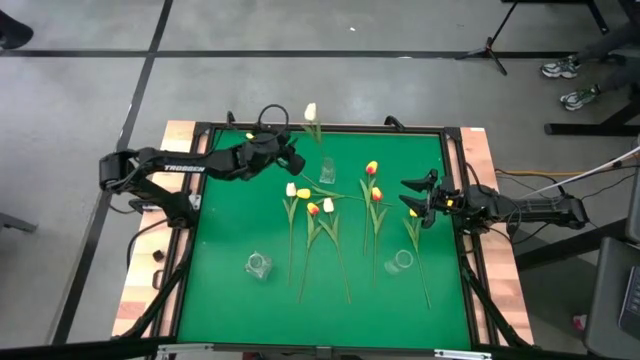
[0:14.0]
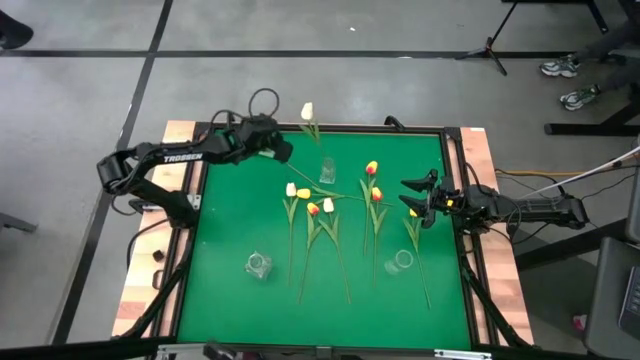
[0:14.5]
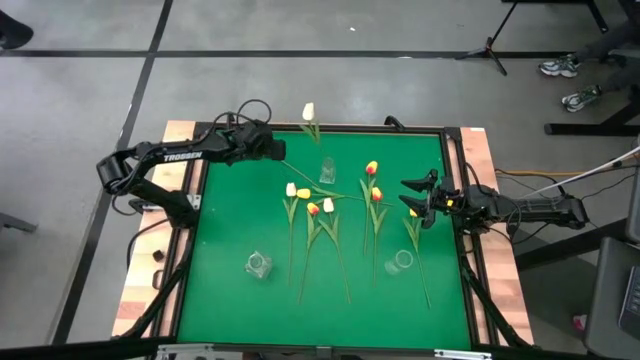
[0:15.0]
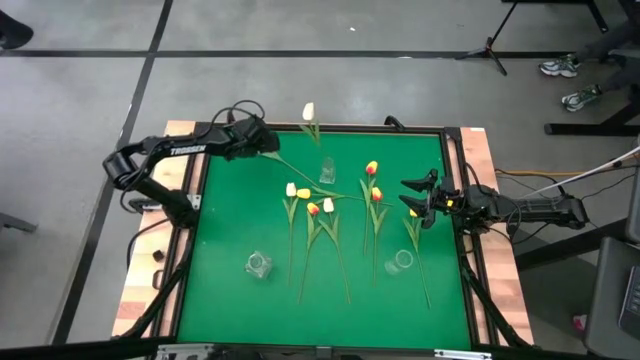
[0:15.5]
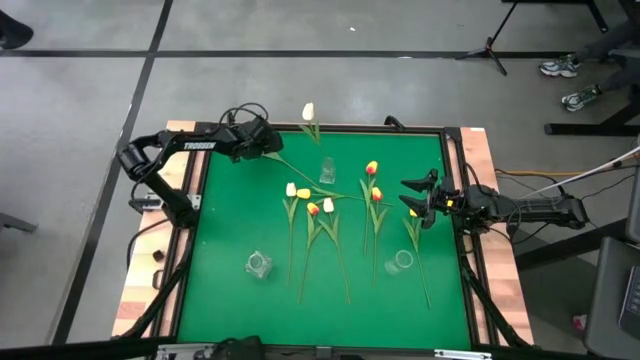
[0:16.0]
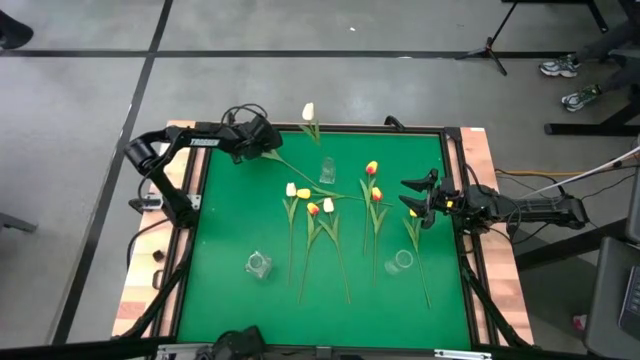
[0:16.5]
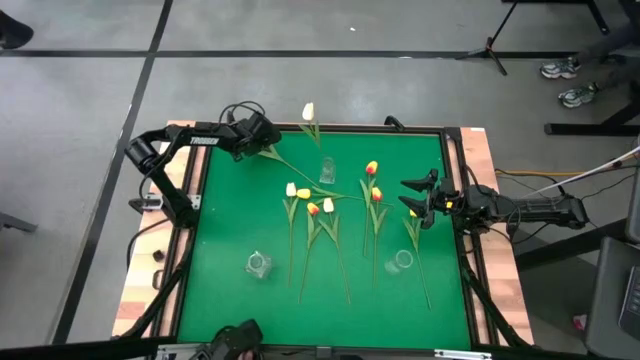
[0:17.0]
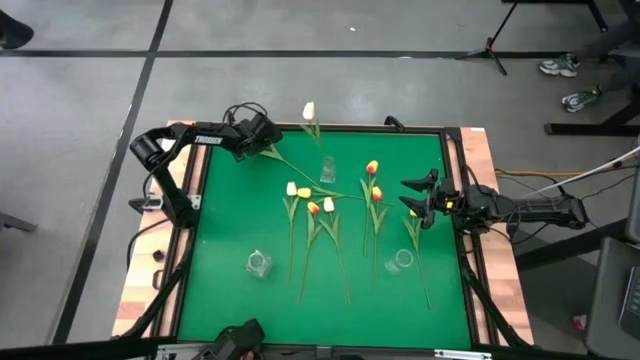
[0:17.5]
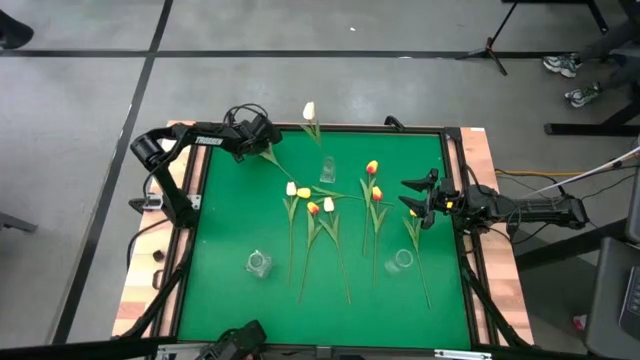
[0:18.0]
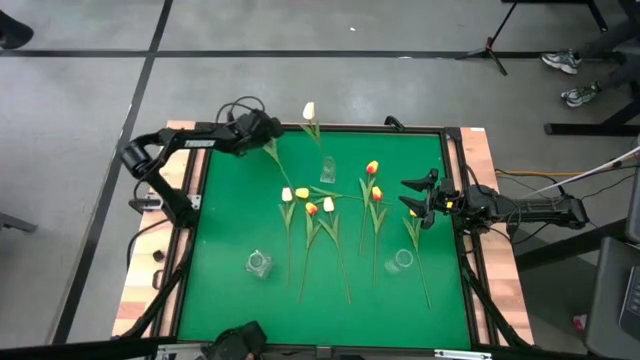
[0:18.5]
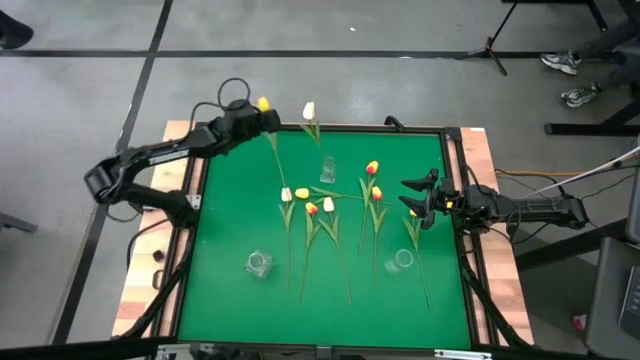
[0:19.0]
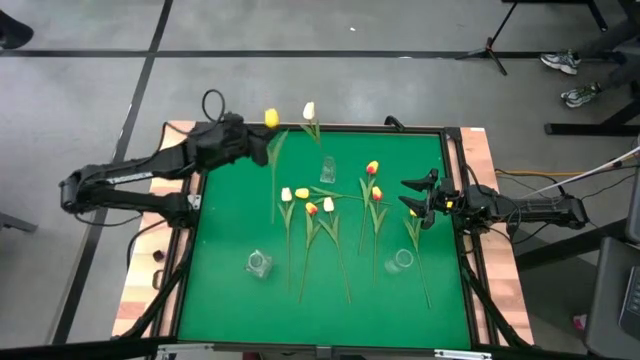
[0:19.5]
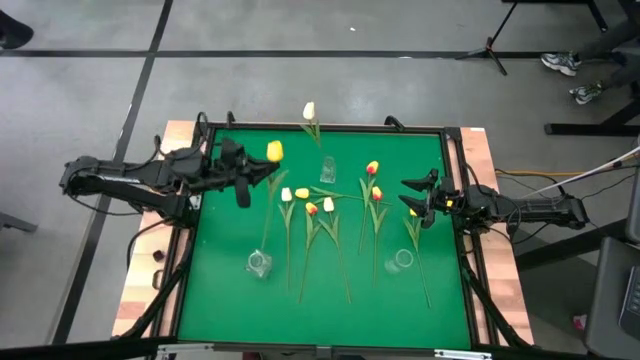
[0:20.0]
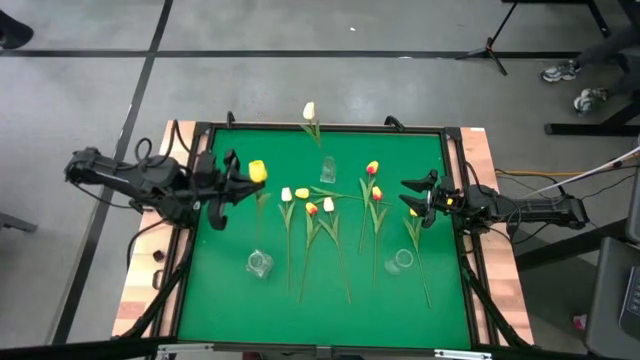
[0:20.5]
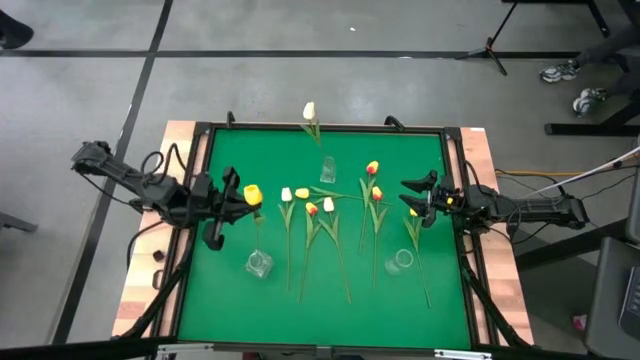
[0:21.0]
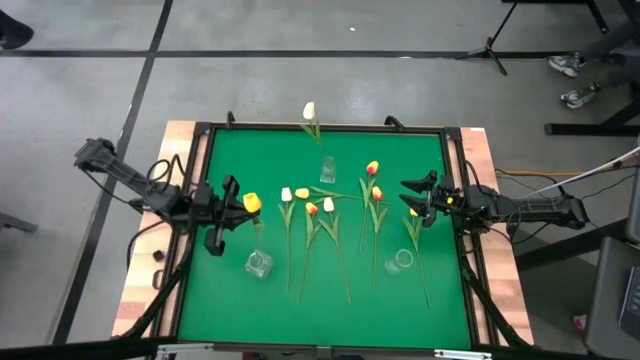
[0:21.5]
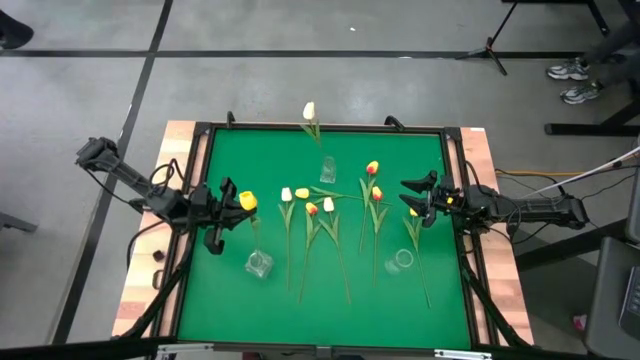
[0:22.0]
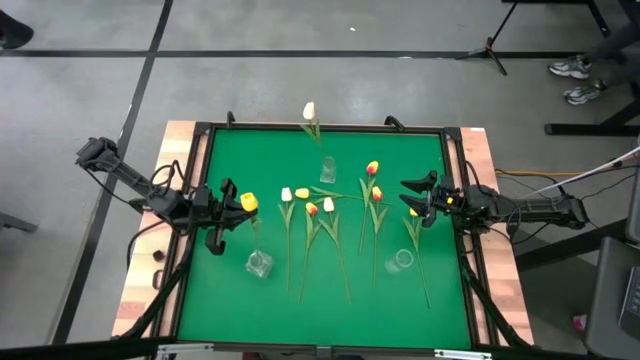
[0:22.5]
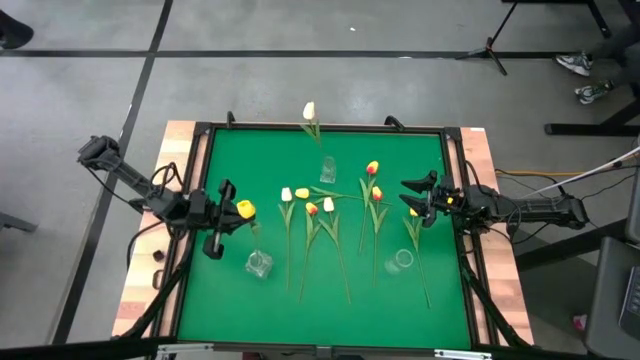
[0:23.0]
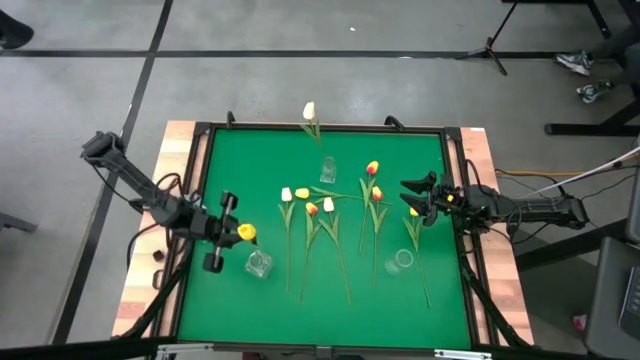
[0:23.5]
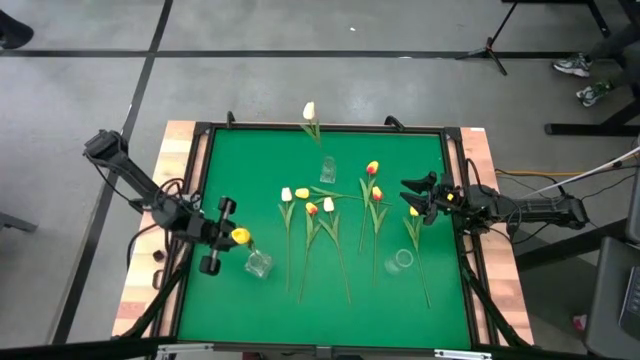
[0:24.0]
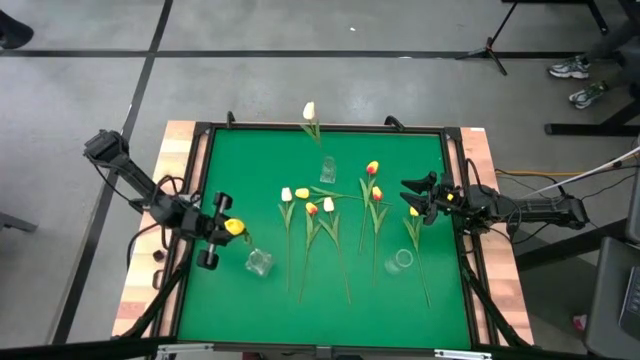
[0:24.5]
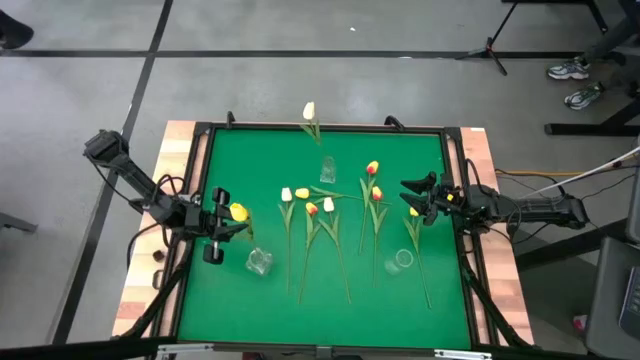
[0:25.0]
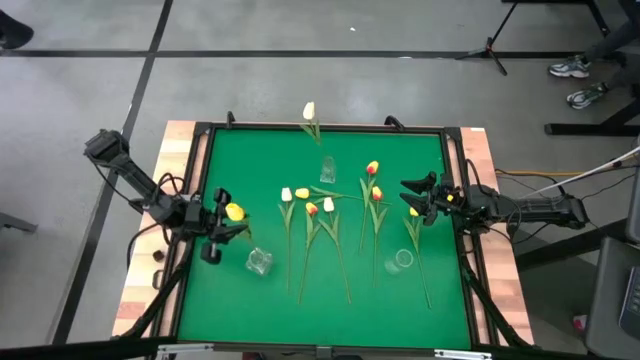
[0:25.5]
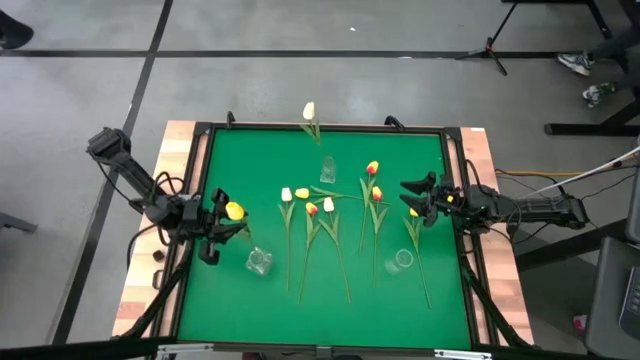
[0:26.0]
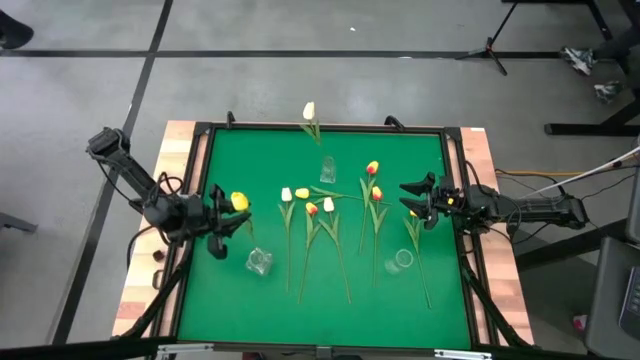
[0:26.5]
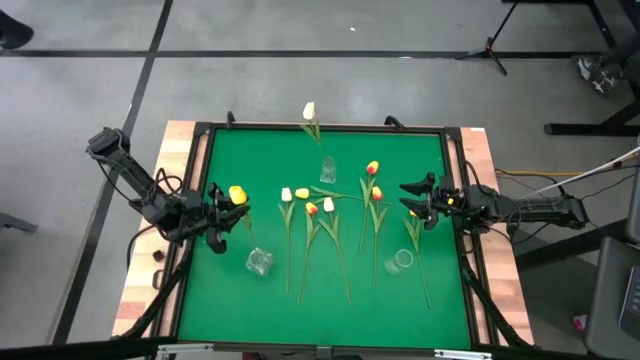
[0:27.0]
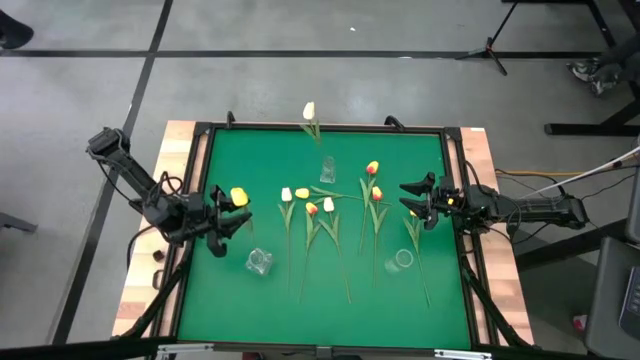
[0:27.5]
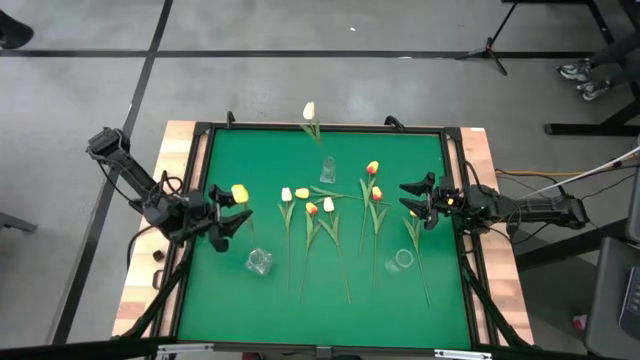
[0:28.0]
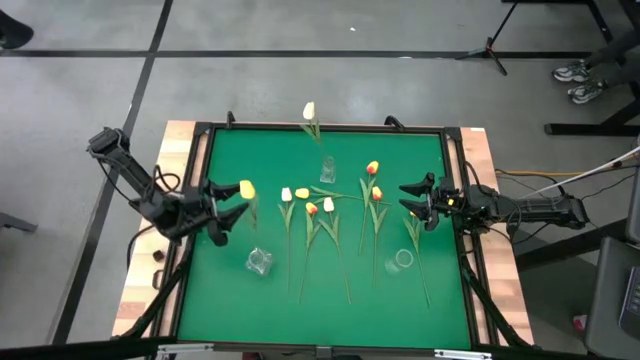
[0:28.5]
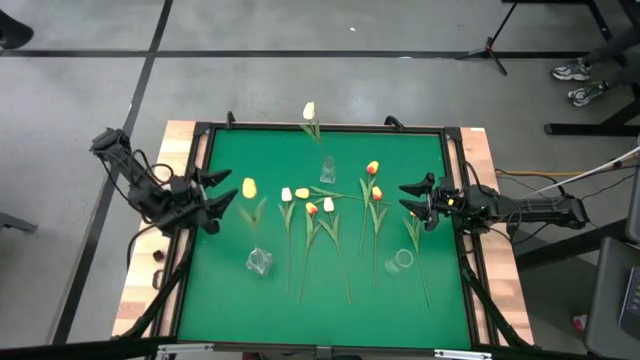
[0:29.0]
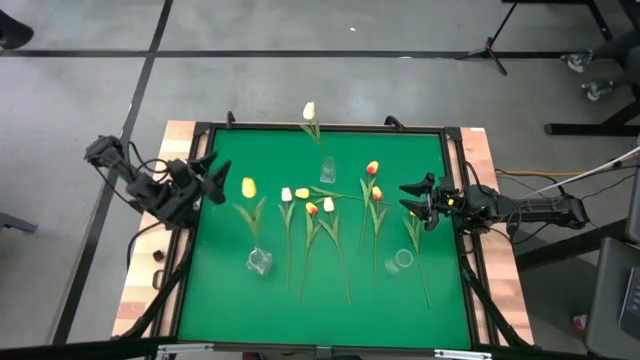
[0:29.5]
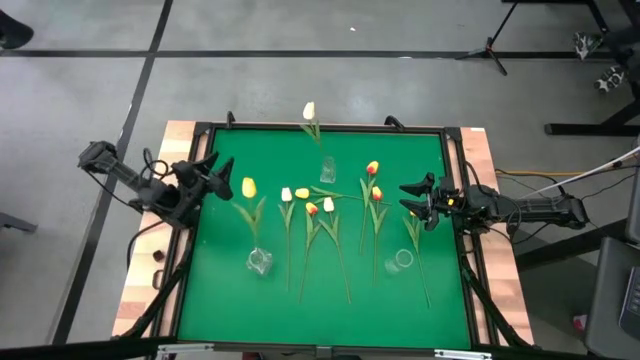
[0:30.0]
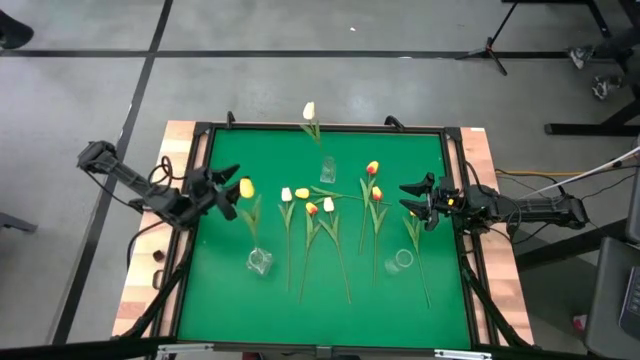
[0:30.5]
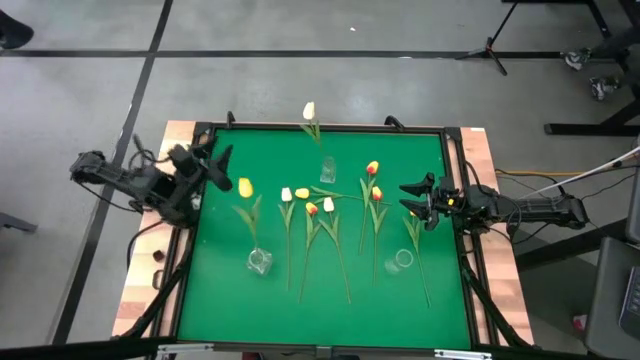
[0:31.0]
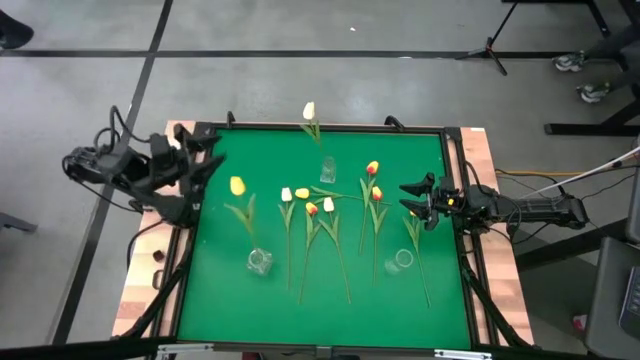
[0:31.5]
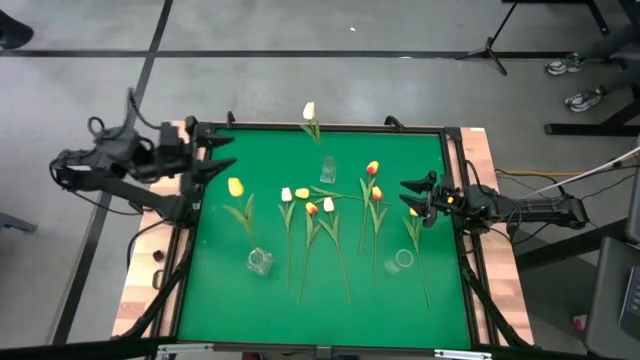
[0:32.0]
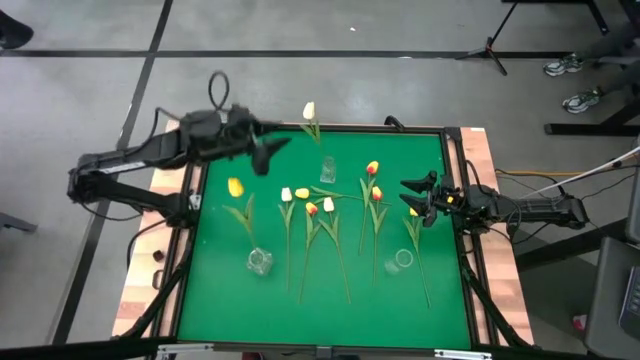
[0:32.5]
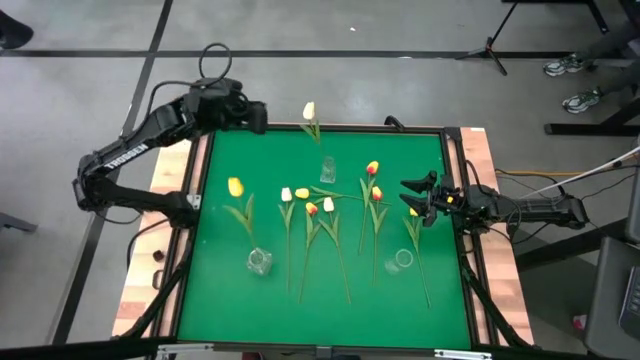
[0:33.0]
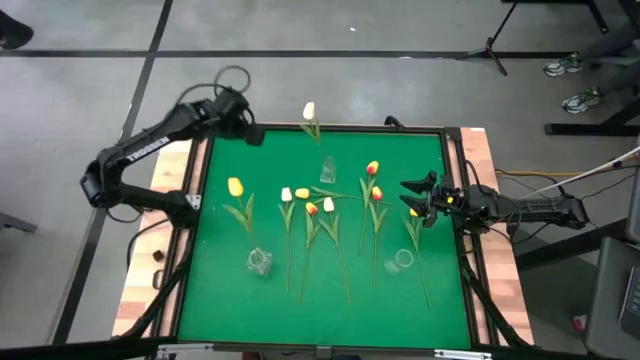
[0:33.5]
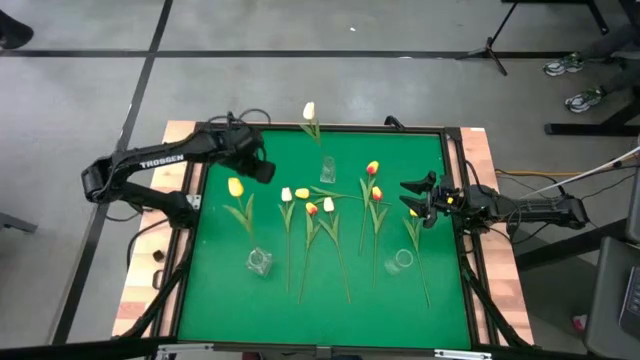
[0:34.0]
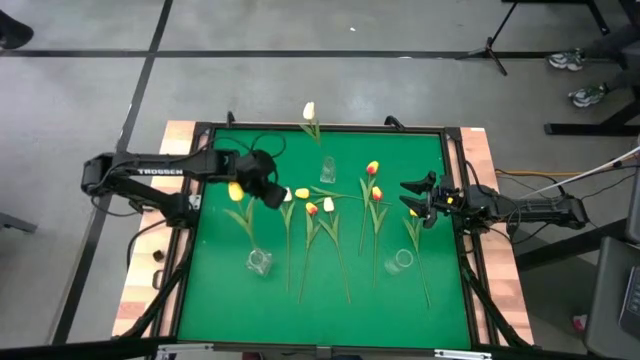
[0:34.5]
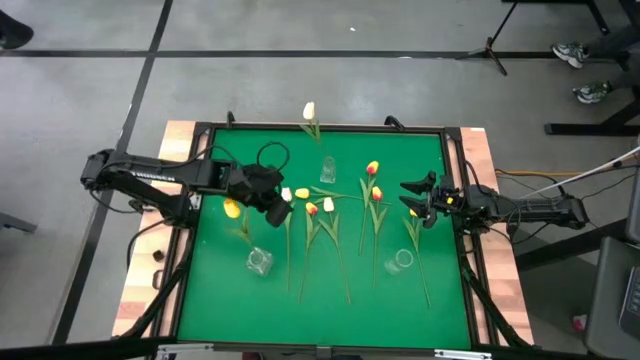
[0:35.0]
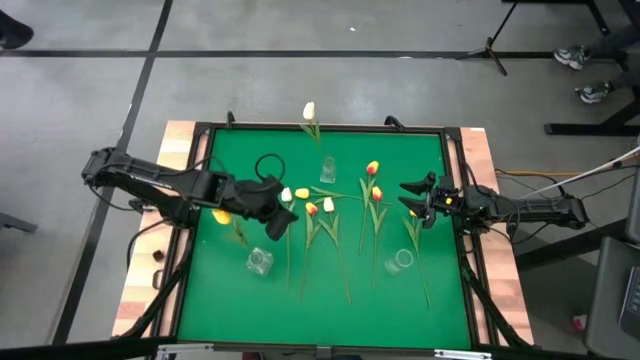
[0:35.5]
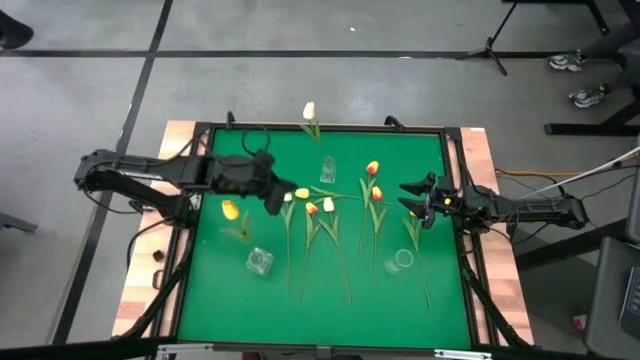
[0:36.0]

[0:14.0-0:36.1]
Task: Sort flowers into vase by color
Put the top left yellow tulip into the bottom left transparent vase
